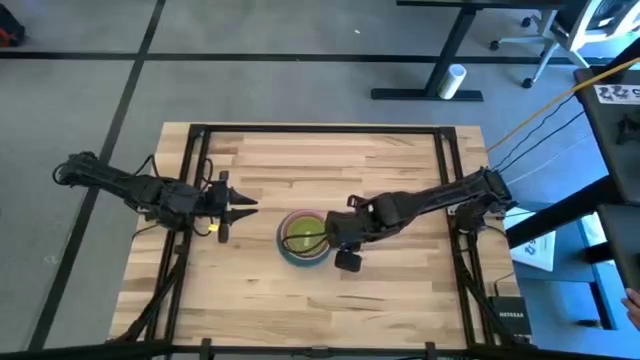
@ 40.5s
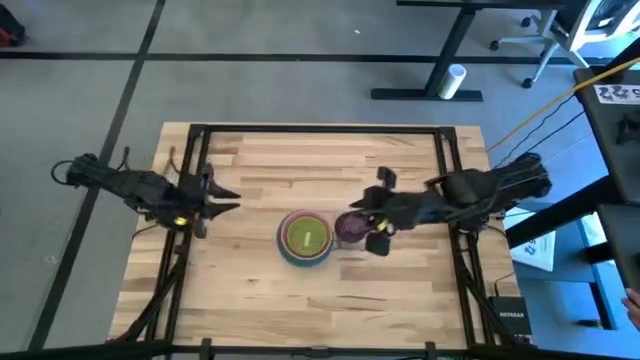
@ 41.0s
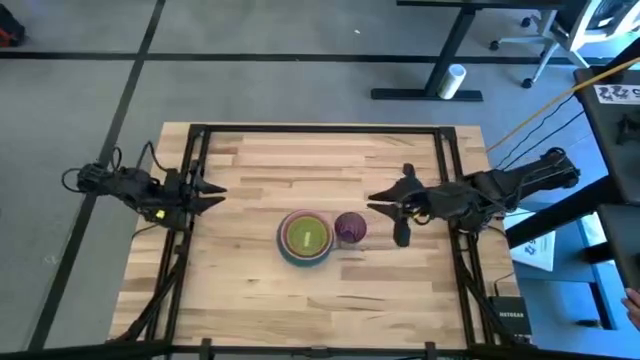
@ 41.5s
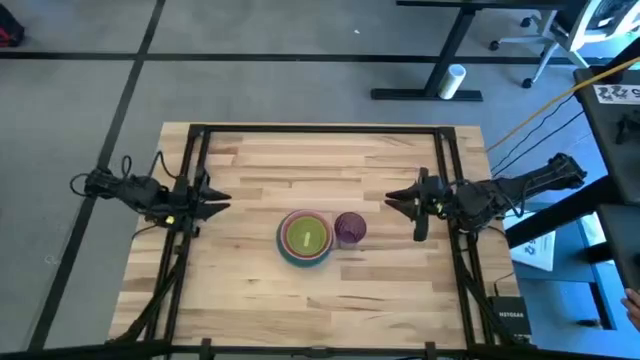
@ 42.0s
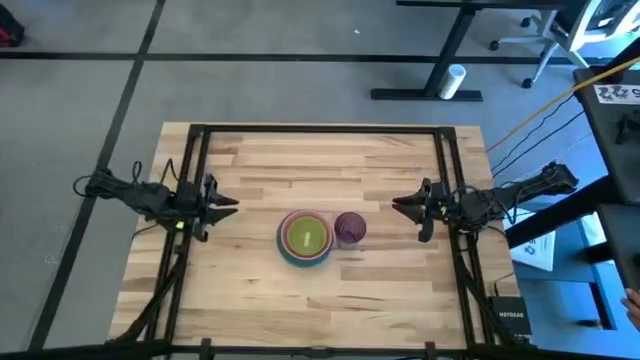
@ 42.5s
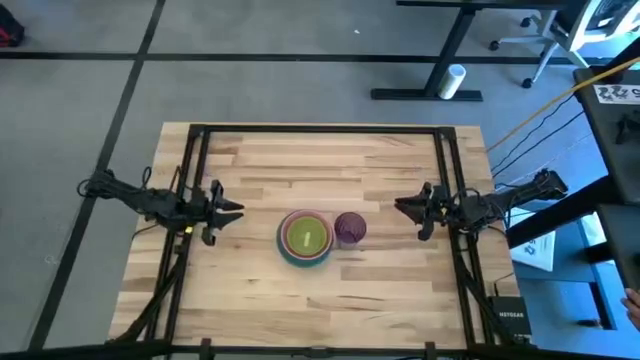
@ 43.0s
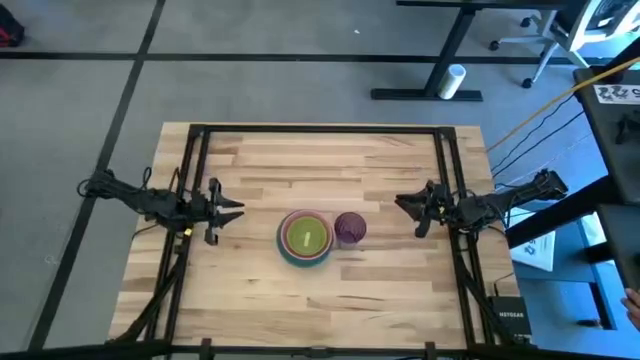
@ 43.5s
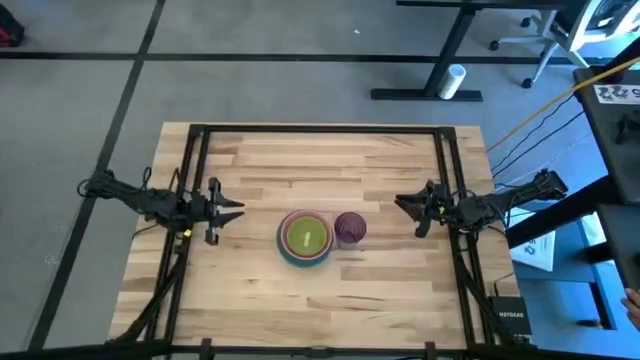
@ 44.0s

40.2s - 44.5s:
Return to Home Position

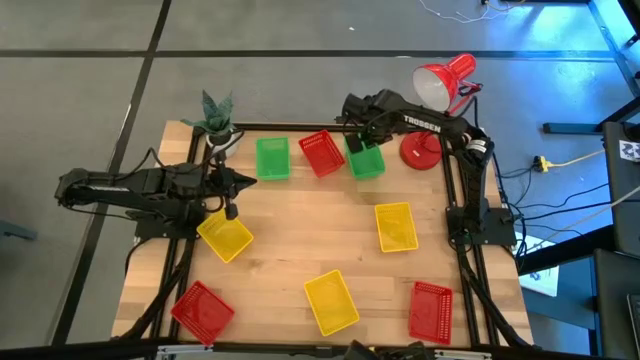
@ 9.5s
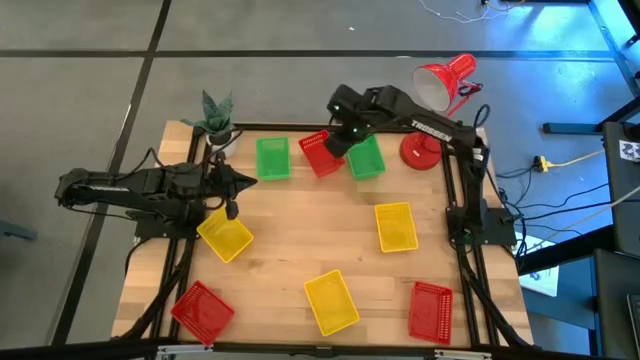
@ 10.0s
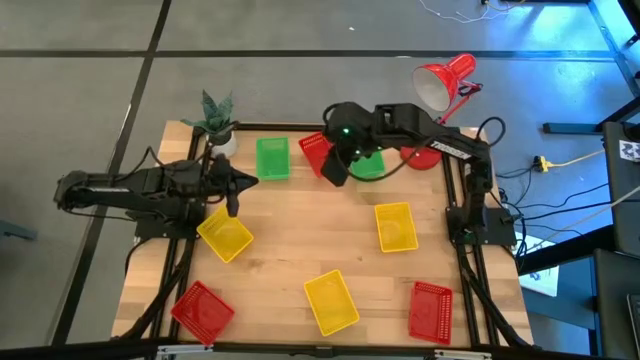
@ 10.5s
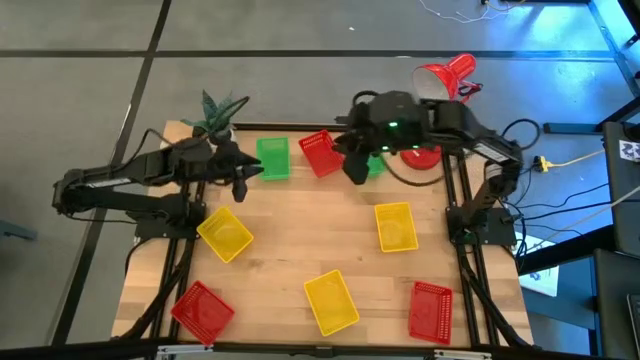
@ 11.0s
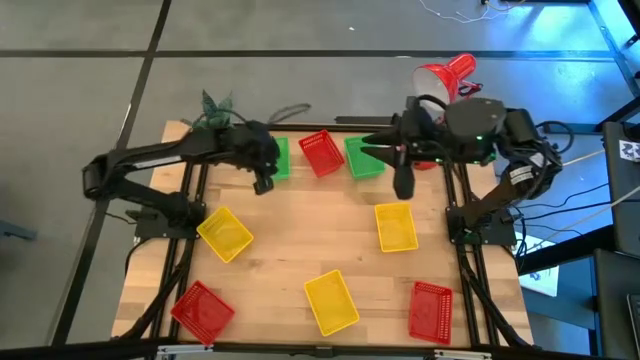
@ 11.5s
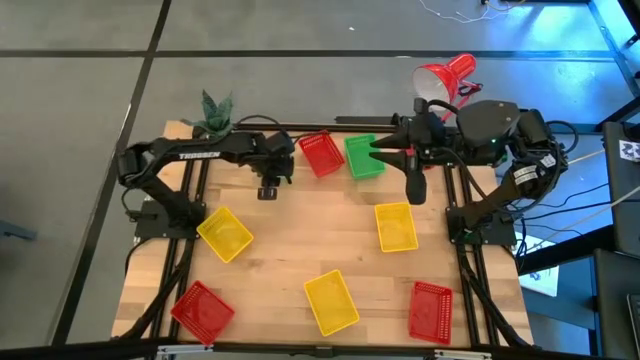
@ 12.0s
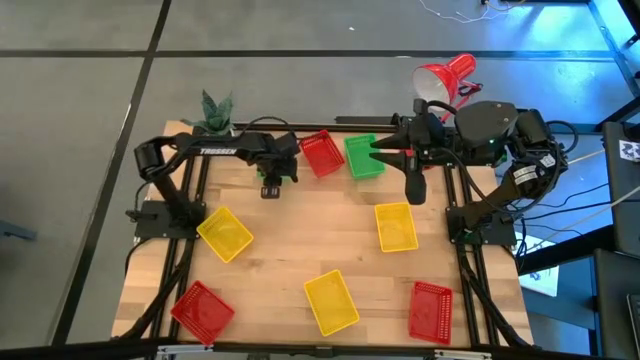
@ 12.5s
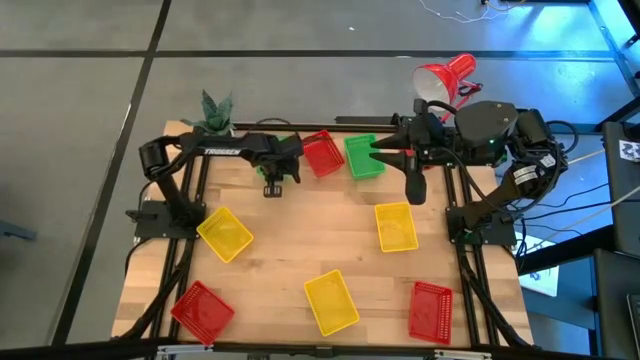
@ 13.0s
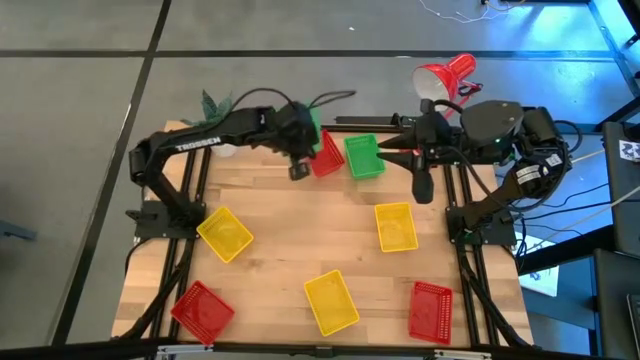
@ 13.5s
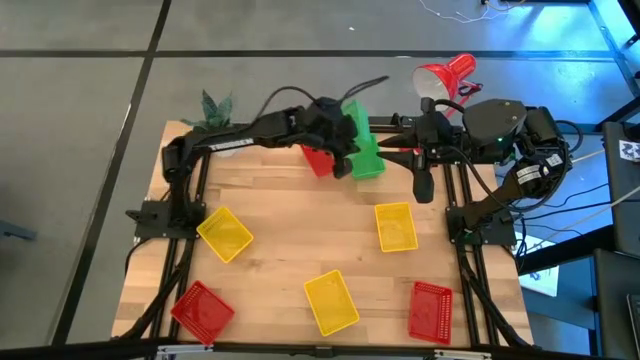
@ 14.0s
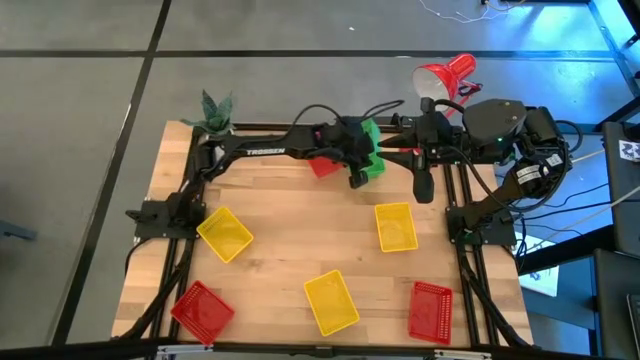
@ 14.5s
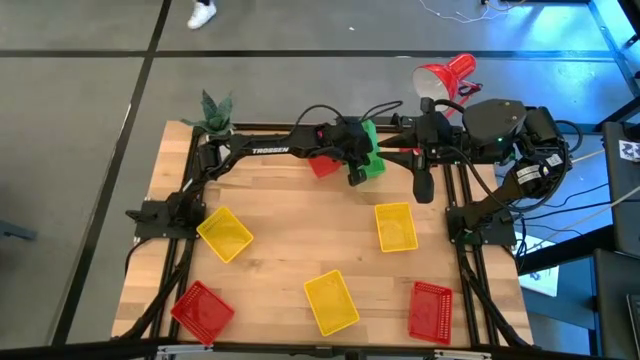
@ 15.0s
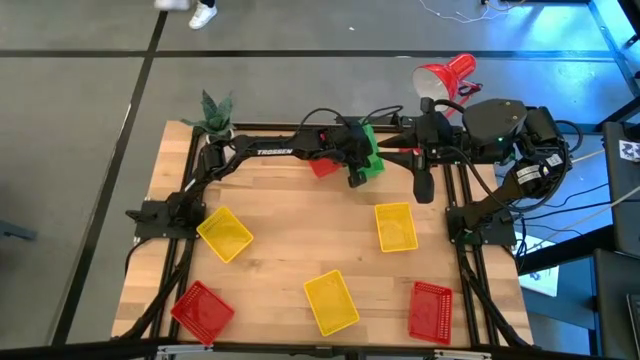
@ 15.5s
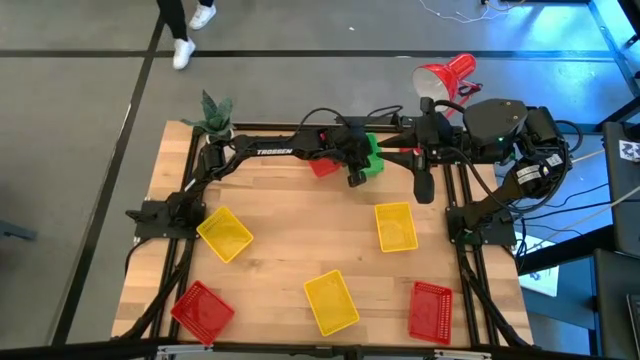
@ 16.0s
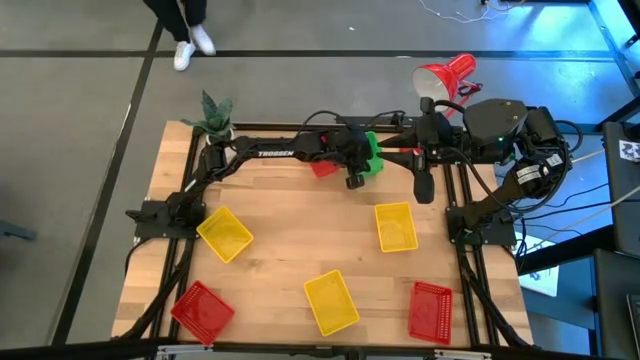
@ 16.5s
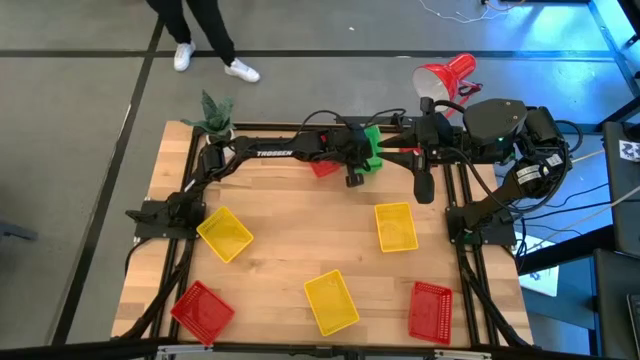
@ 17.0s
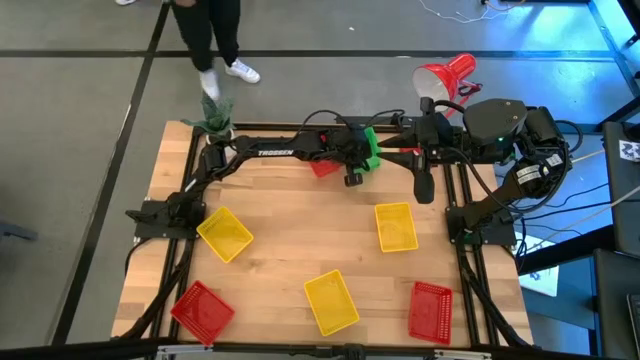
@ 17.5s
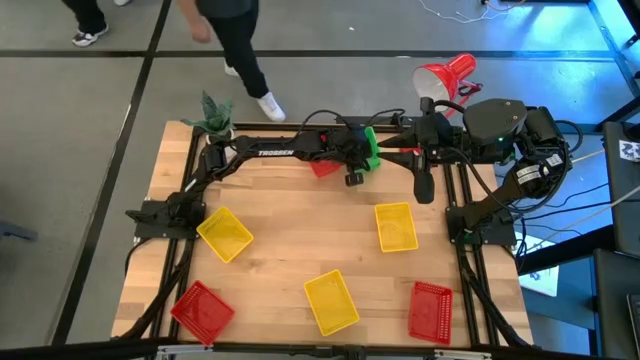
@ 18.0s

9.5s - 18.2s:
Stack the left green bin on the right green bin

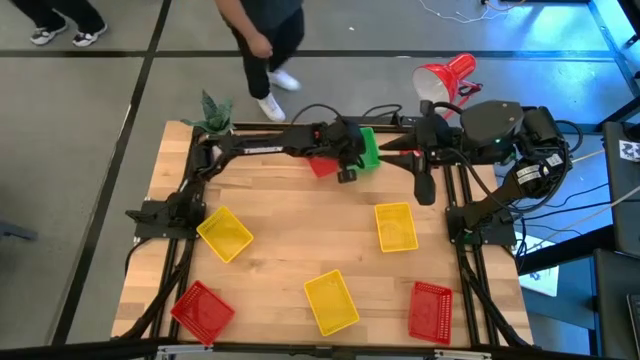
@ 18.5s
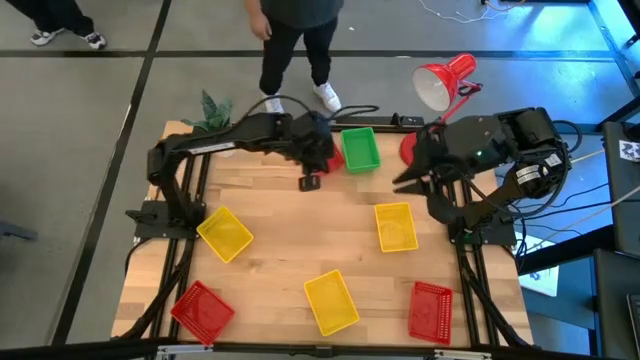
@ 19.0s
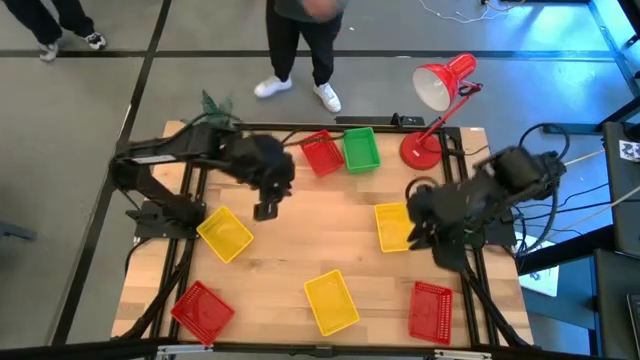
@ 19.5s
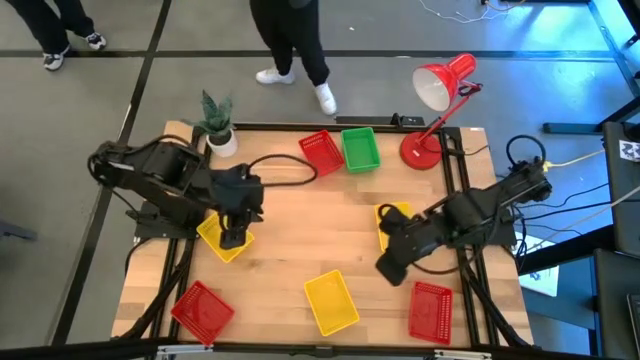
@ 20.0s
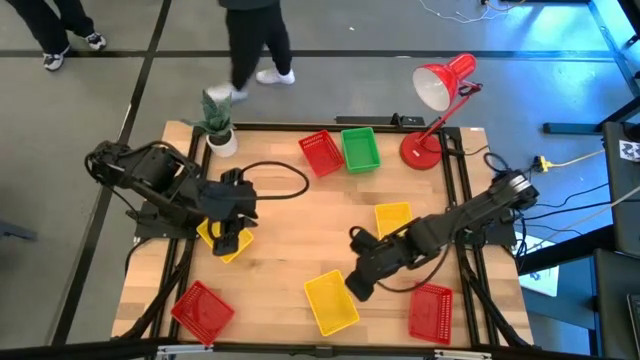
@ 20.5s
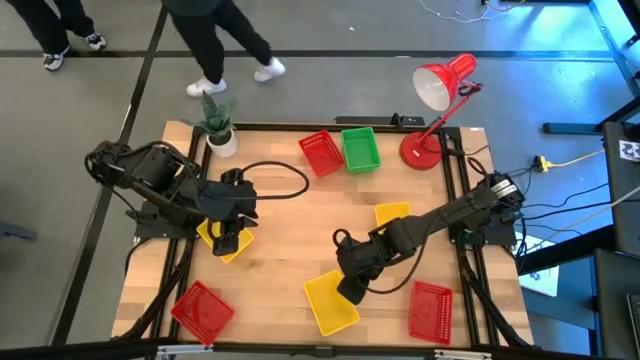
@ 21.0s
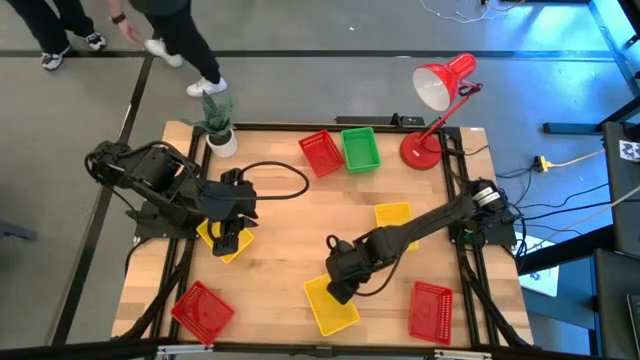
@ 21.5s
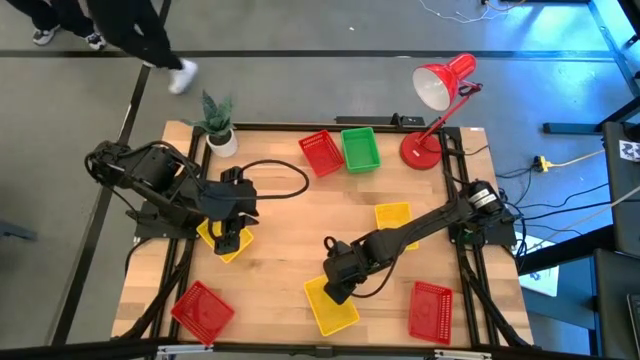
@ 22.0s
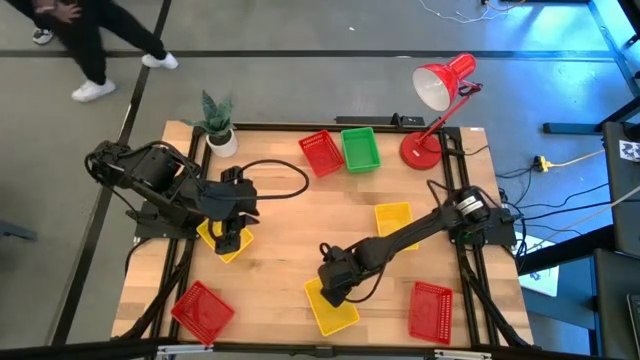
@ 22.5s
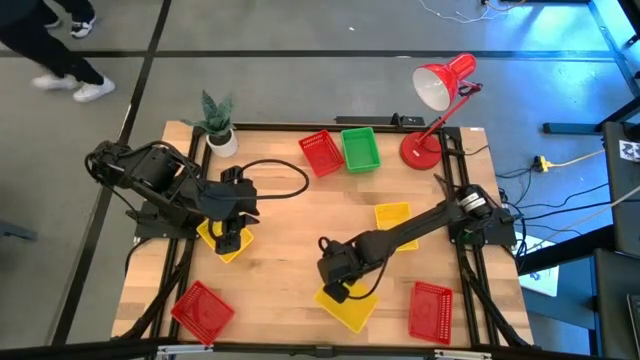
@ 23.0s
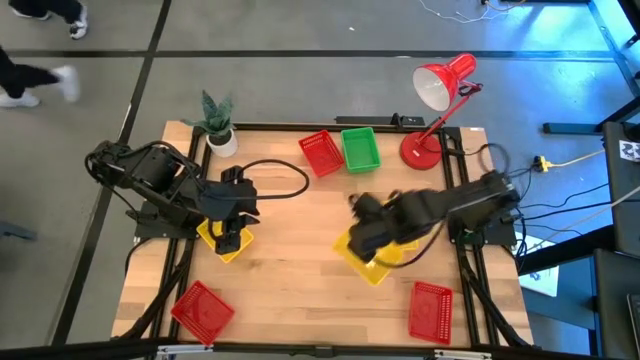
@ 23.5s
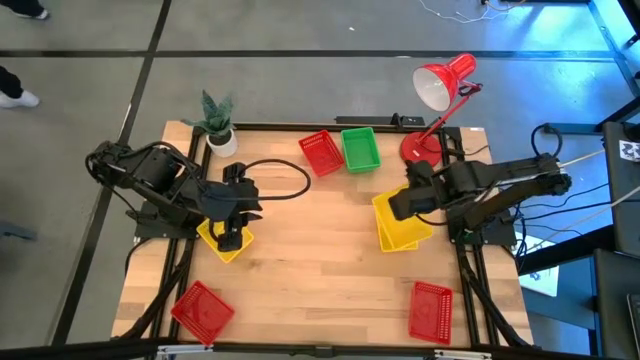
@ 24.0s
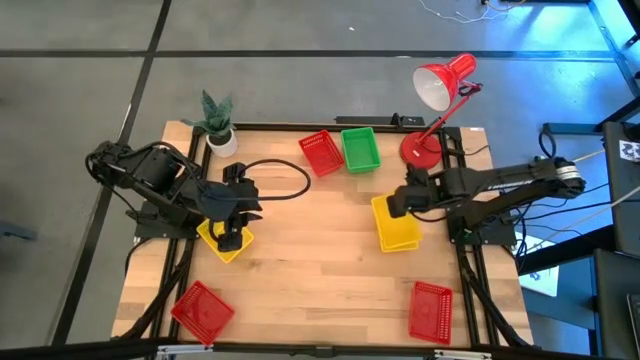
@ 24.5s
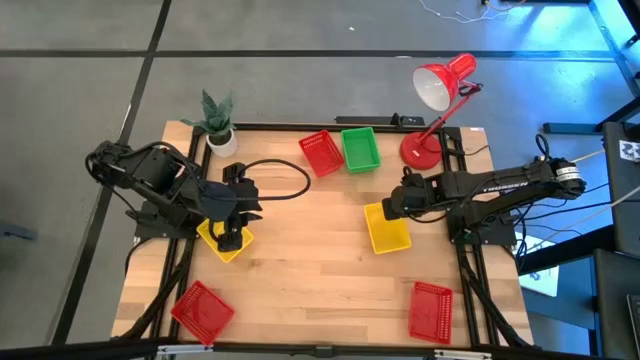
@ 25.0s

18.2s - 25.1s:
Stack the bottom yellow bin on the top right yellow bin

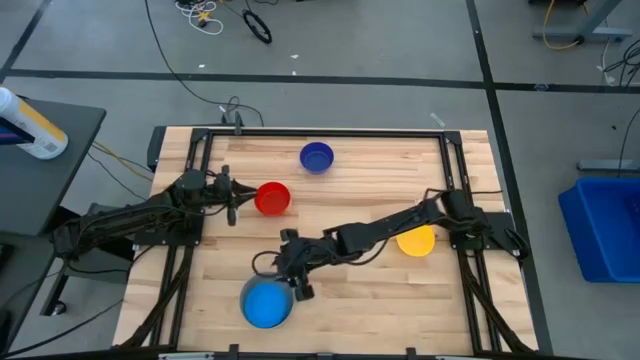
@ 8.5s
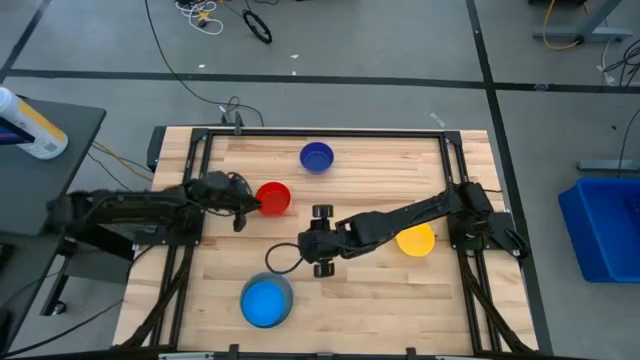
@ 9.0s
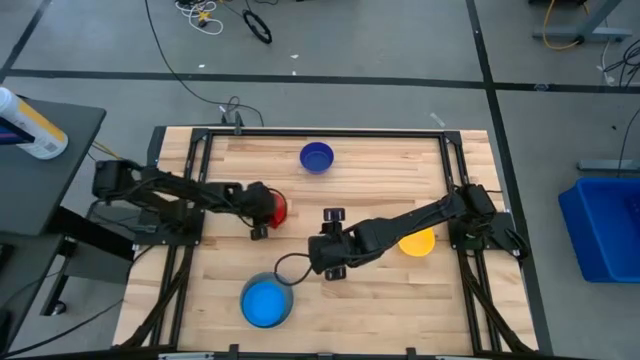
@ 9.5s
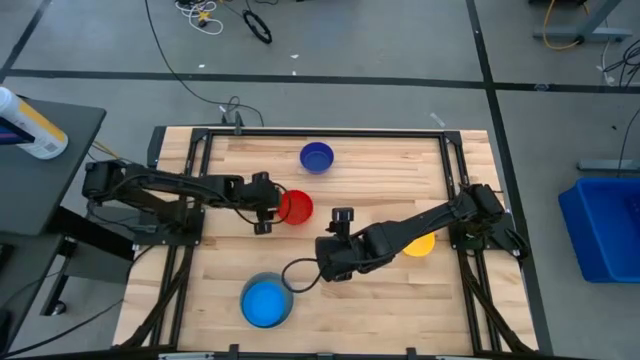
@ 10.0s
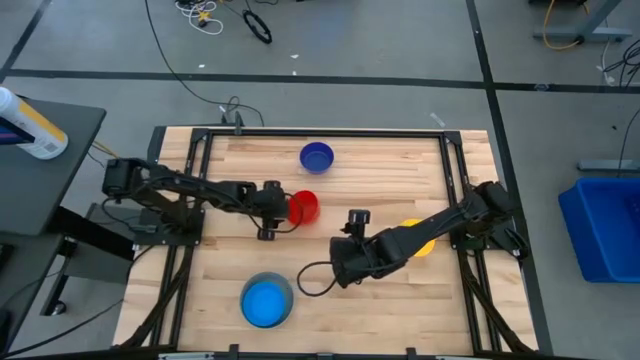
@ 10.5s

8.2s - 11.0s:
Stack the red bowl on top of the light blue bowl
